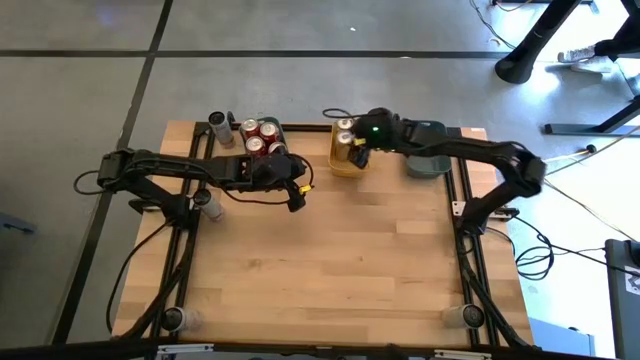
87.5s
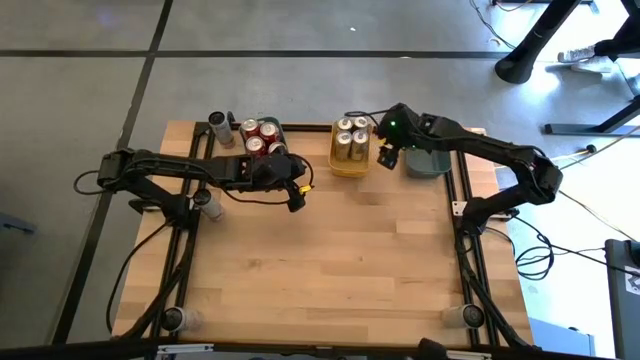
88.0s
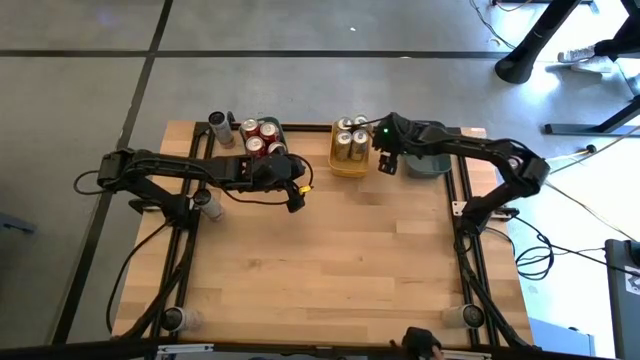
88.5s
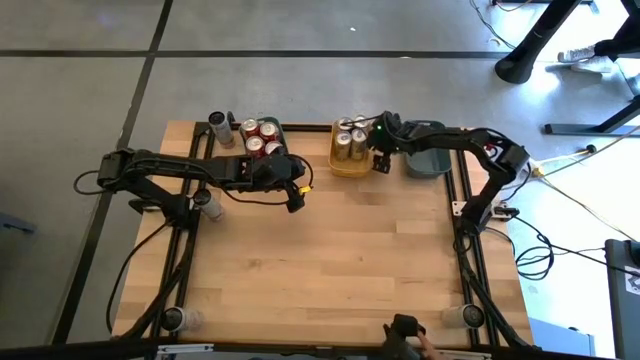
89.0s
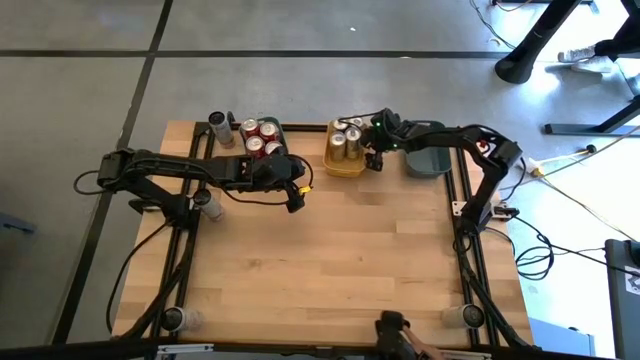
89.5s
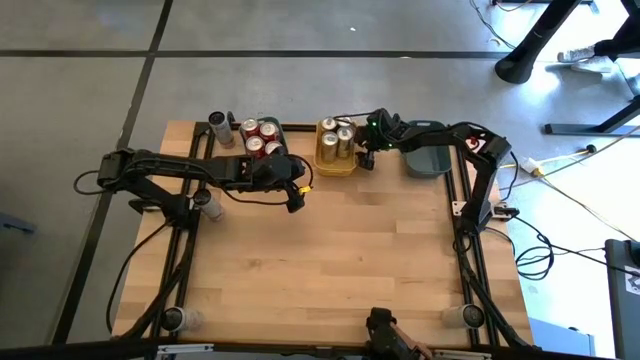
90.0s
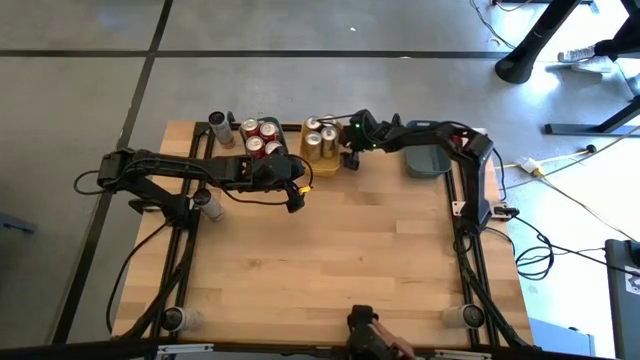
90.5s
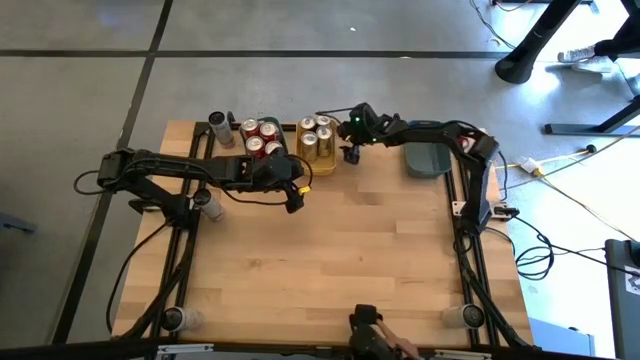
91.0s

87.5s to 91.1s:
Task: Sort soda cans
Adjust the yellow bin

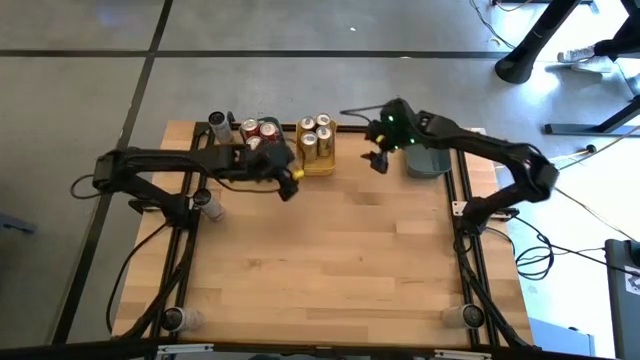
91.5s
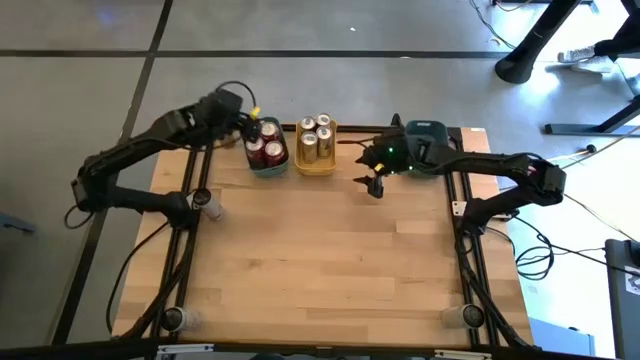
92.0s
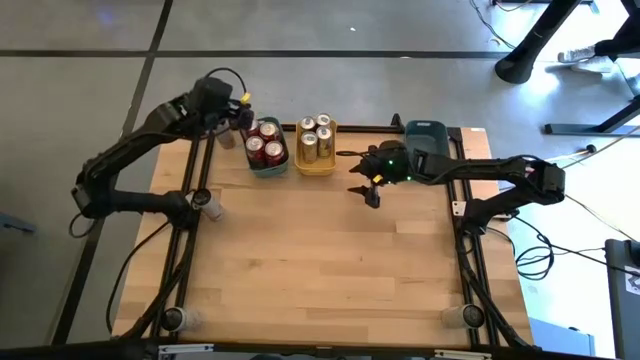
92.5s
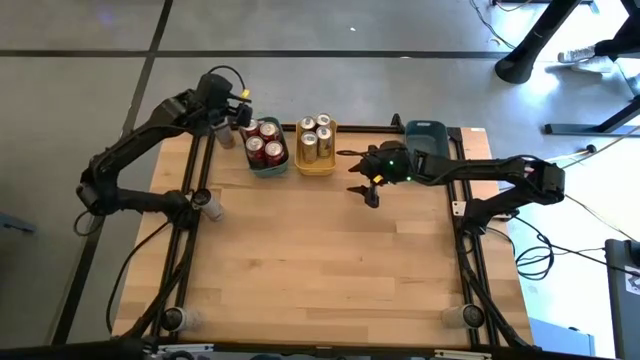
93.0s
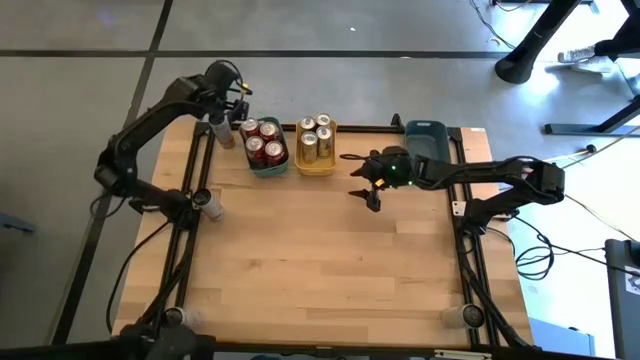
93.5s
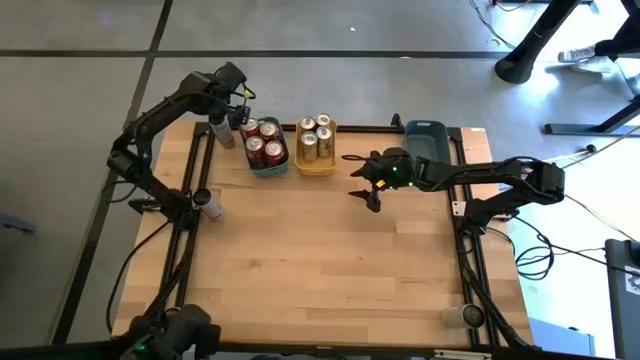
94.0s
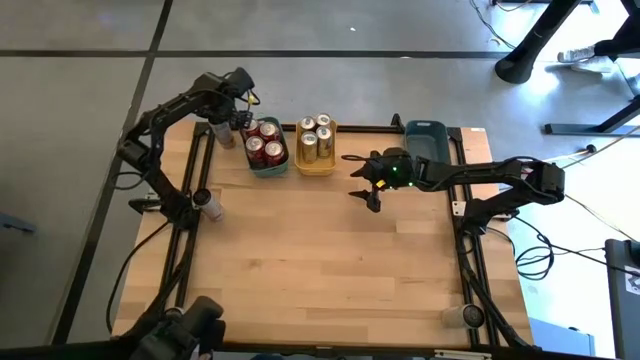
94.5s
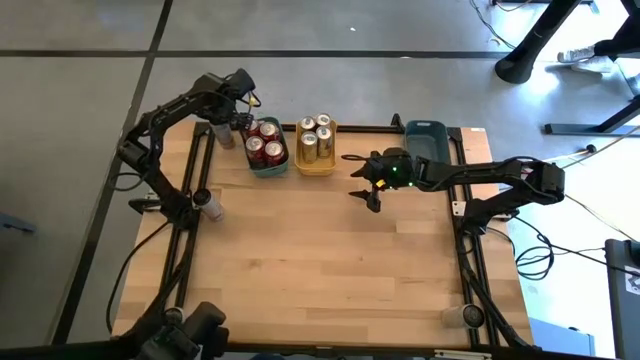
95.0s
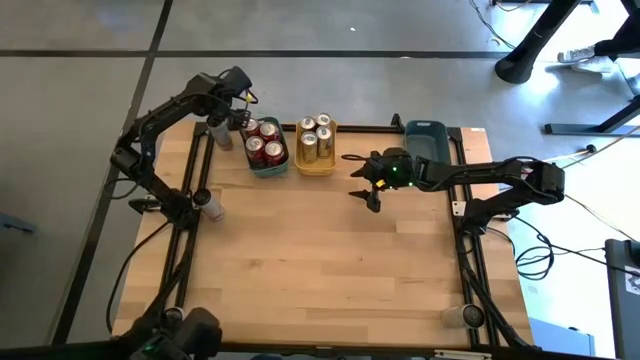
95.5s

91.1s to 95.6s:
Put the top white-pink soda can into the blue bin

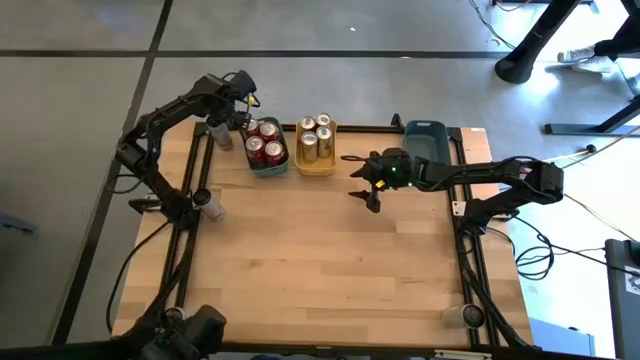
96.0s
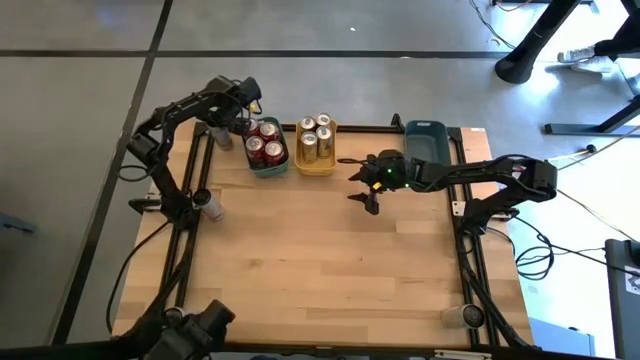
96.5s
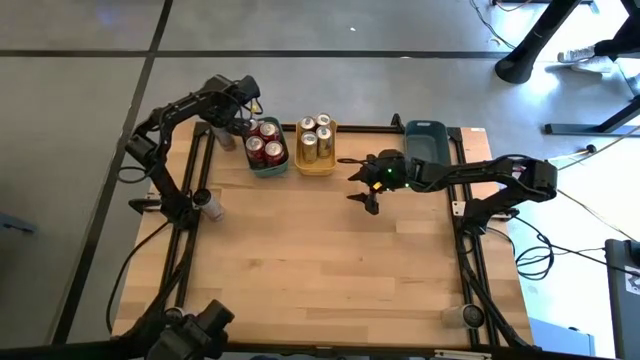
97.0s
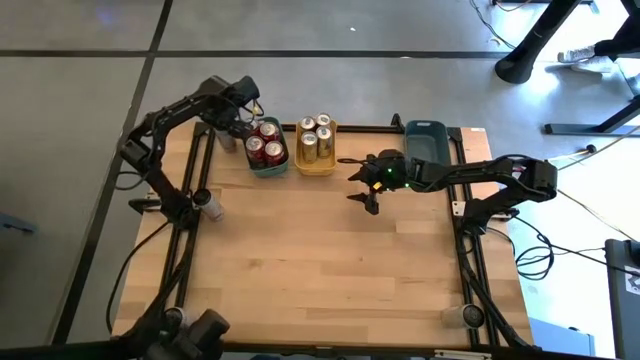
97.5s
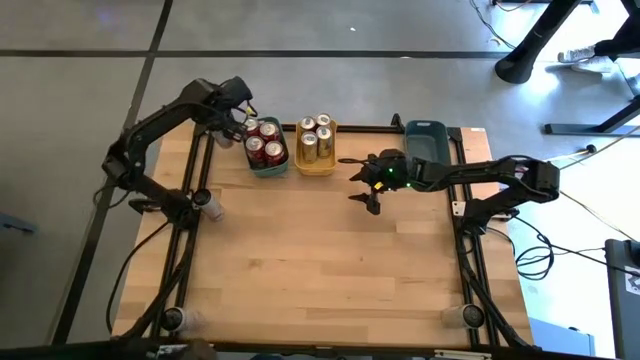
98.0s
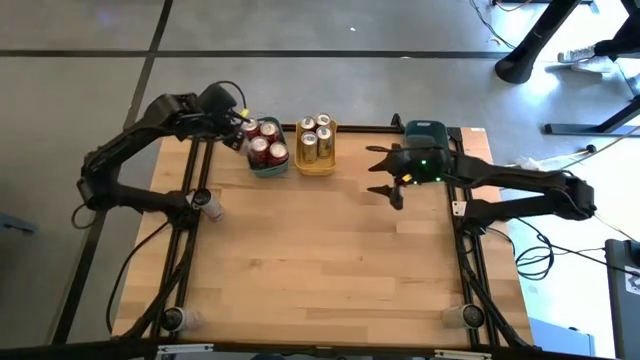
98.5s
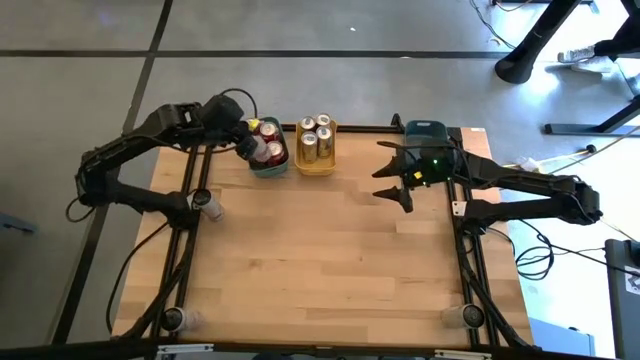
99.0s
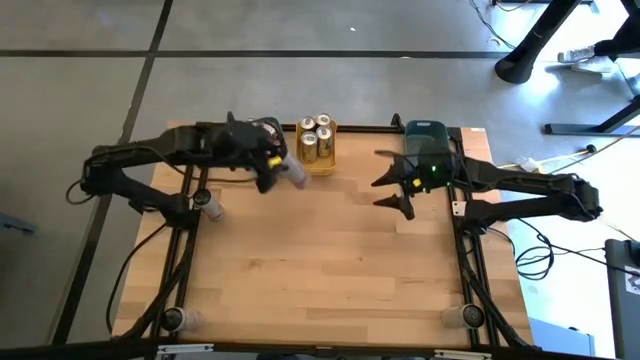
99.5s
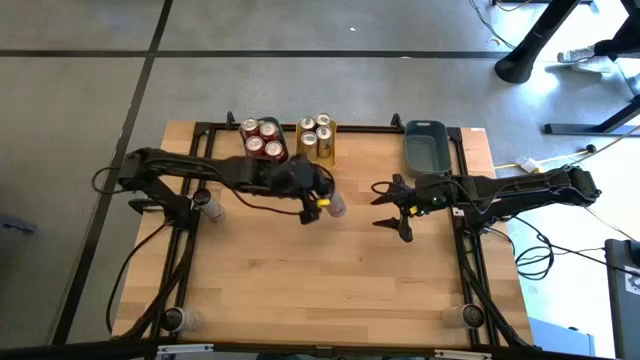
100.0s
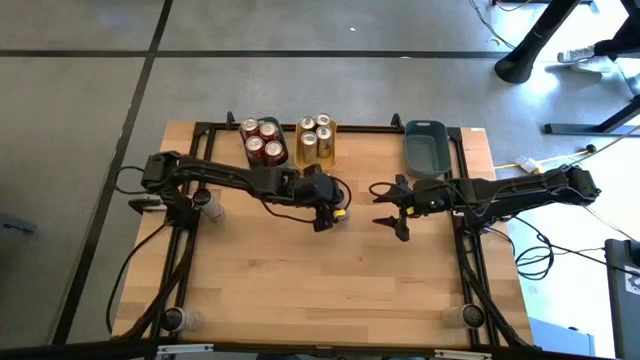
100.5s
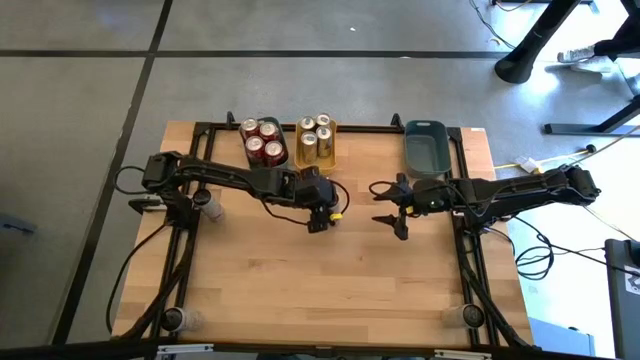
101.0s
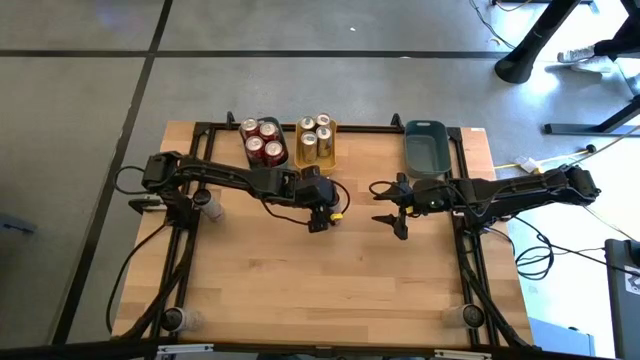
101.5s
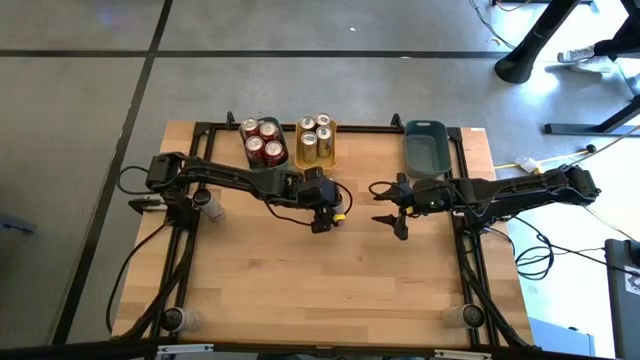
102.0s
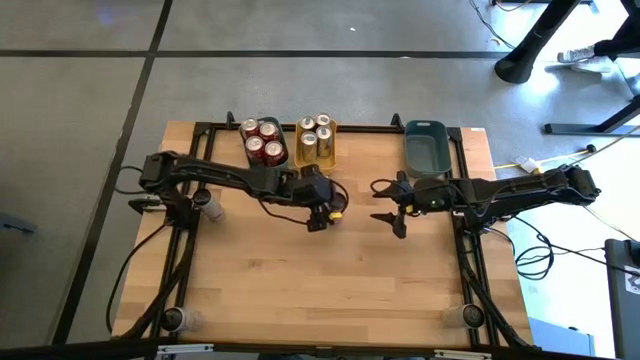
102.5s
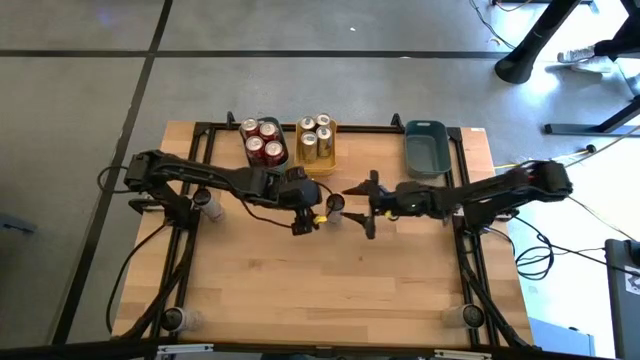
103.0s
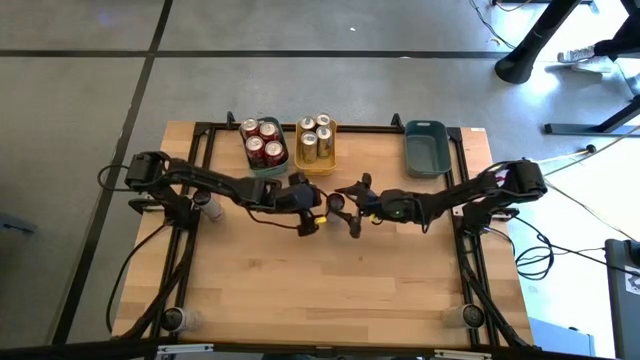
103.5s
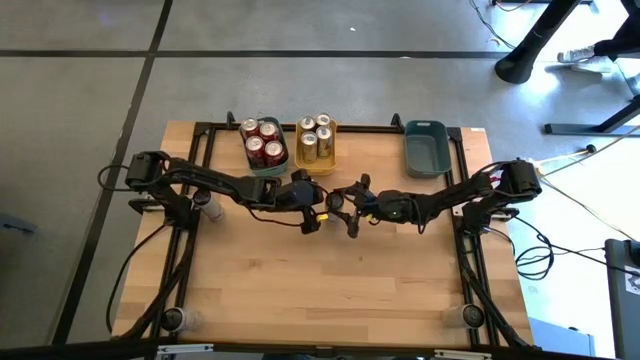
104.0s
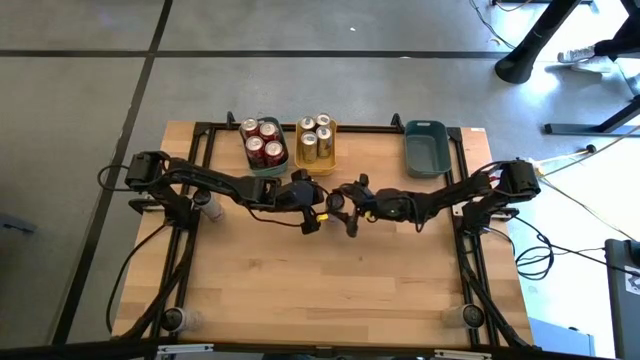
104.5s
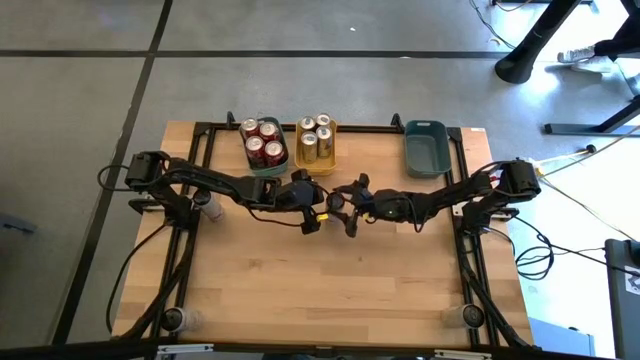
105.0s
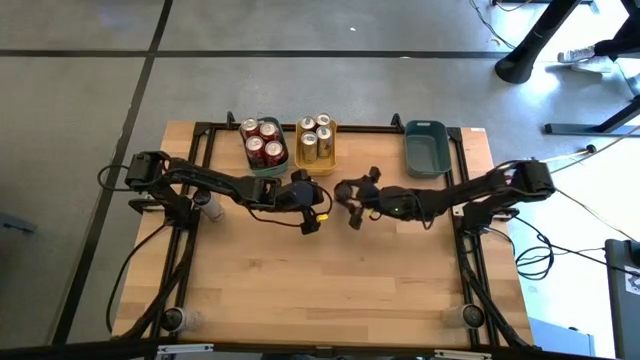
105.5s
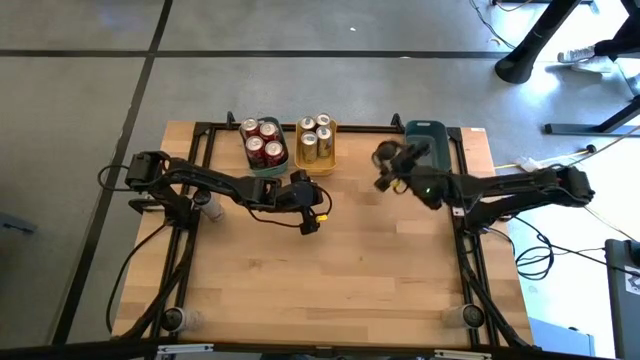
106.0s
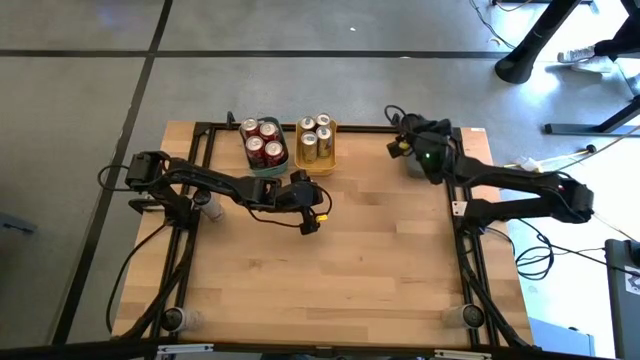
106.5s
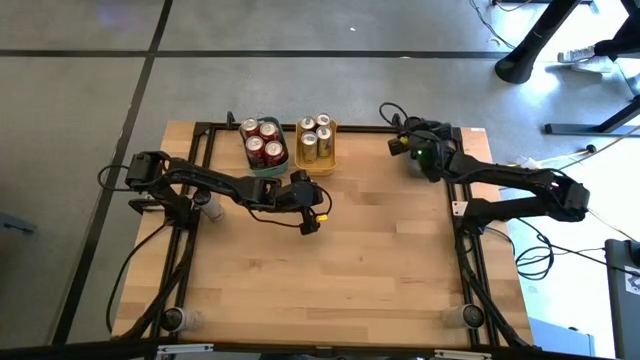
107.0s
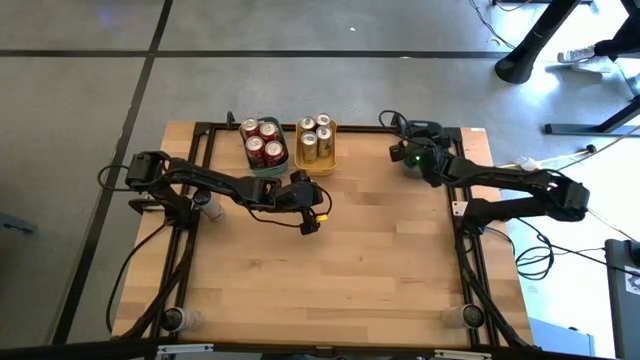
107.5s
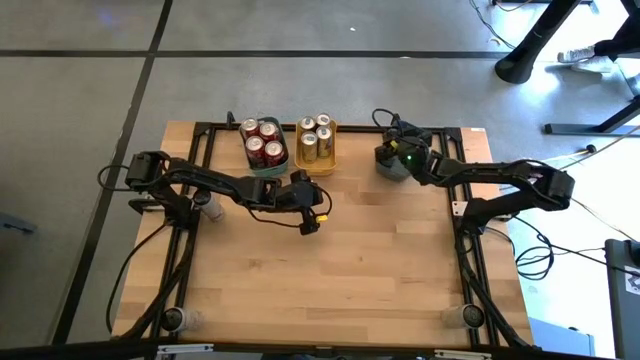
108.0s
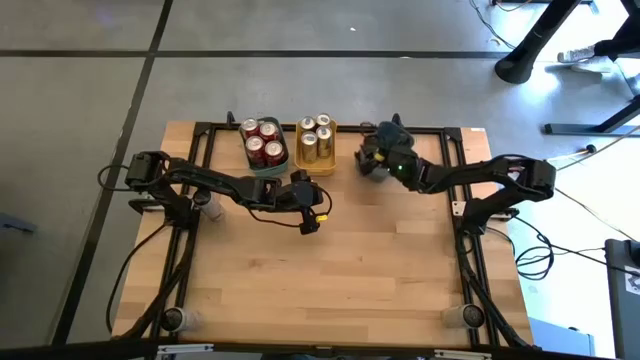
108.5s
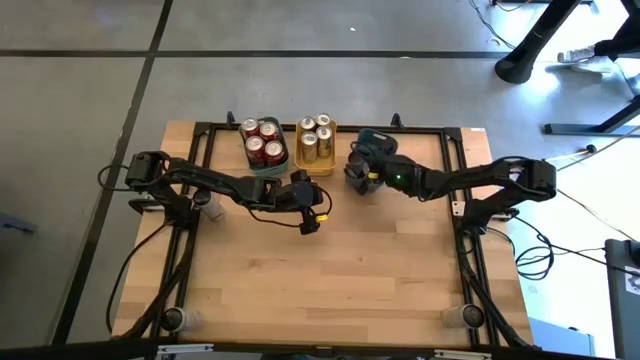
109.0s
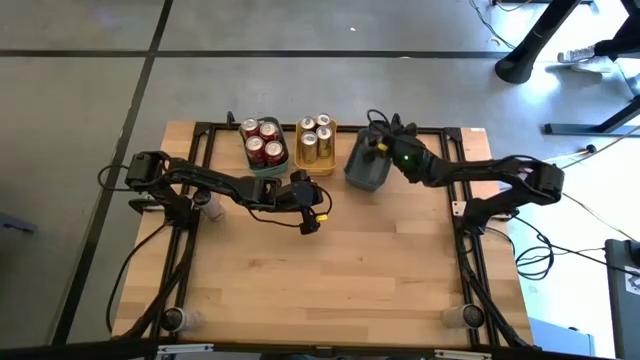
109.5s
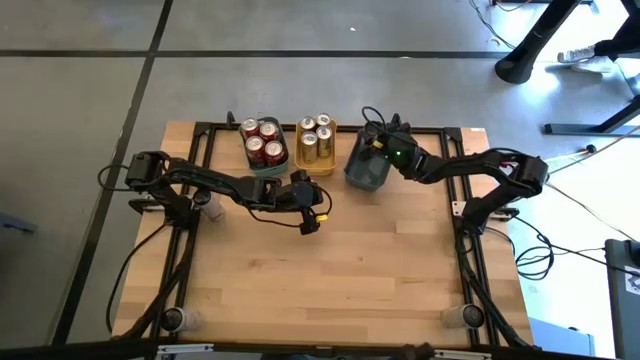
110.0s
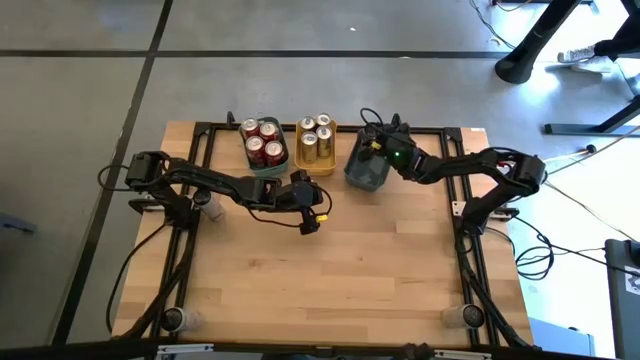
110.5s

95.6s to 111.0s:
Put the top white-pink soda can into the blue bin
